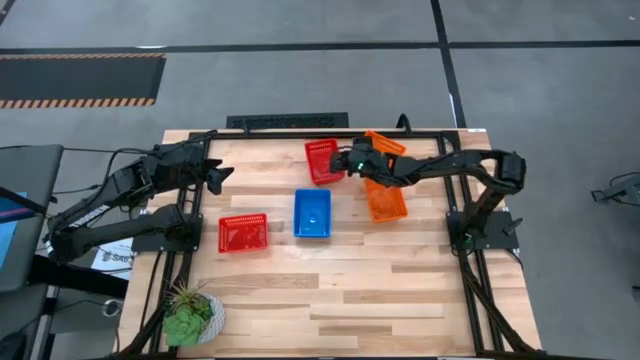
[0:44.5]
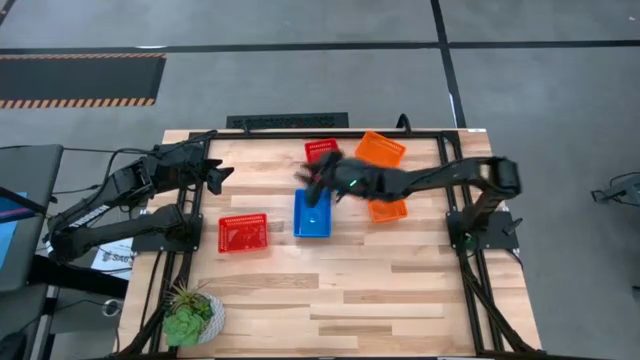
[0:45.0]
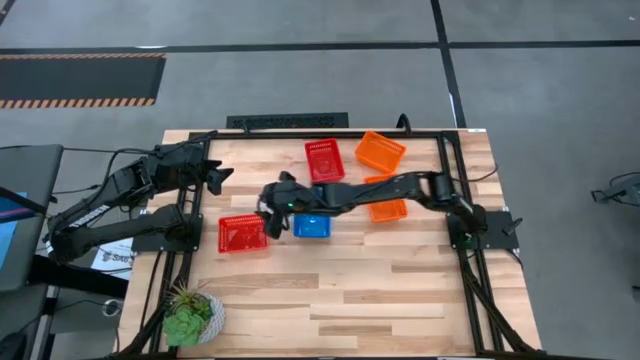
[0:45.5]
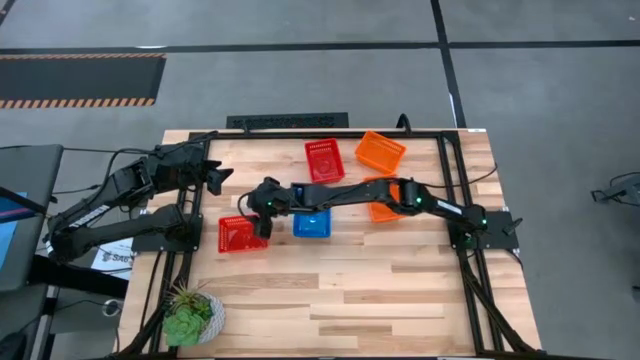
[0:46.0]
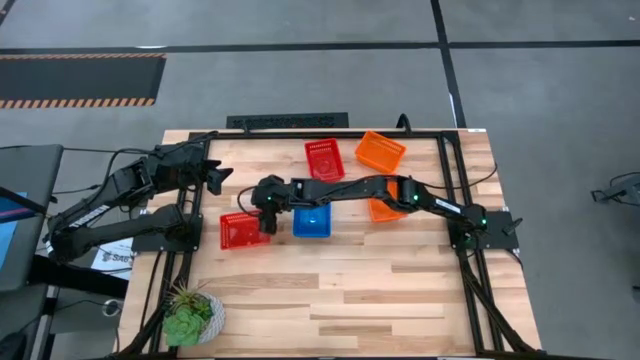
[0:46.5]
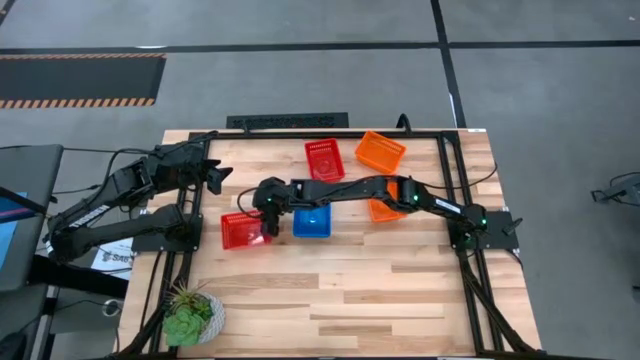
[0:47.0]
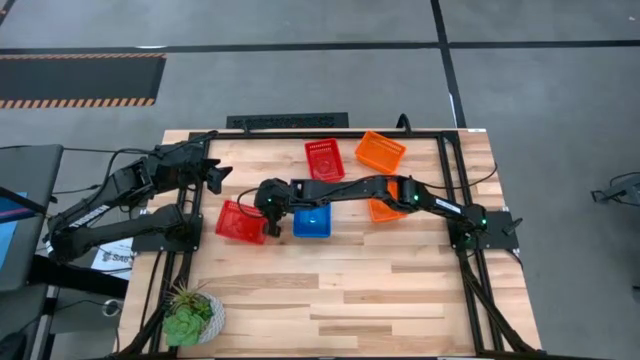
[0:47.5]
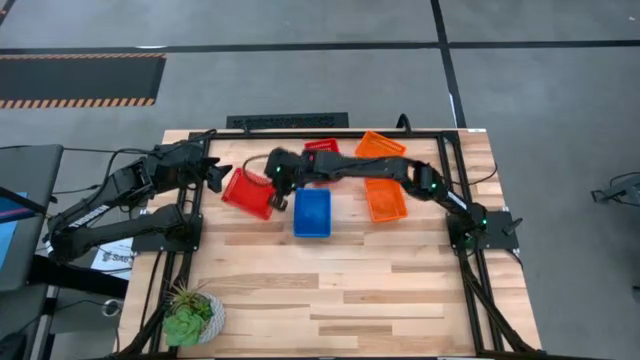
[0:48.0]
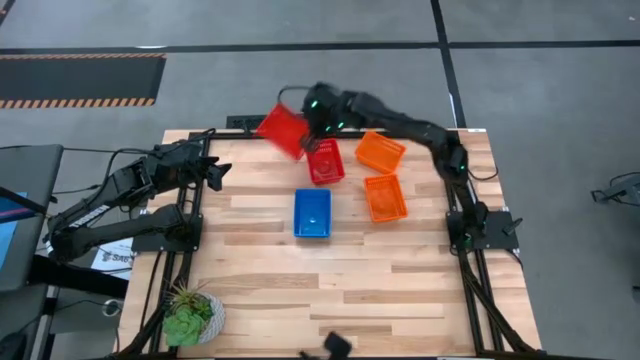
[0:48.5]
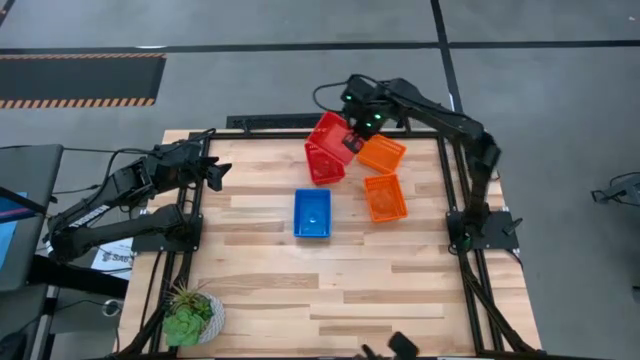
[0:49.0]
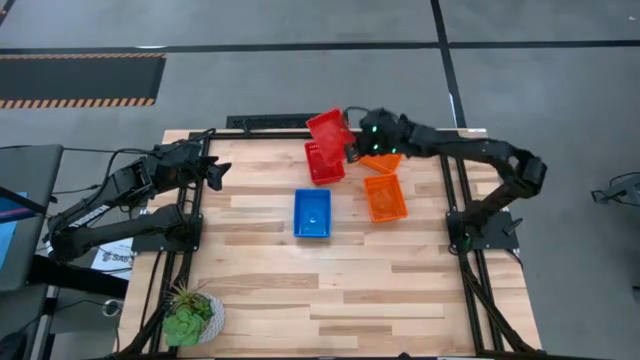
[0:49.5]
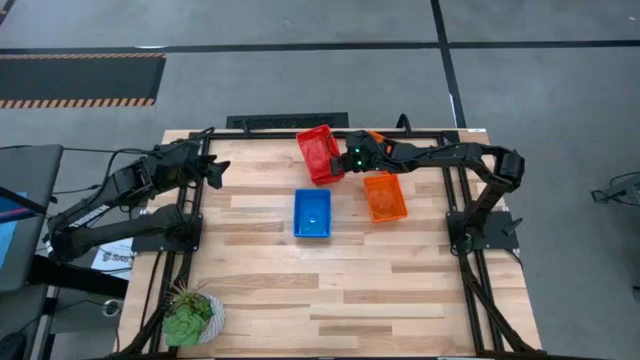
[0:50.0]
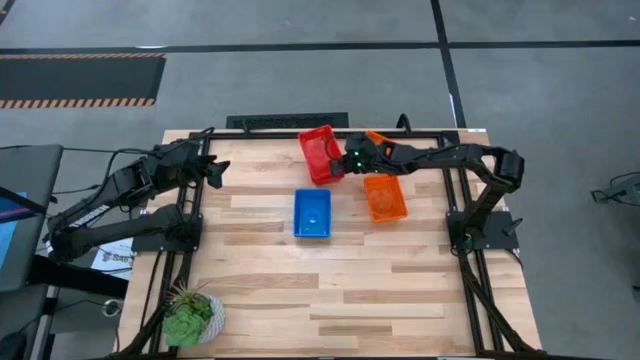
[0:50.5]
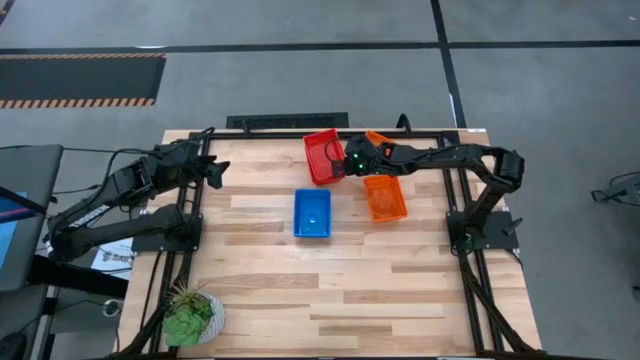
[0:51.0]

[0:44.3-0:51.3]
Stack the red bin into the stacked red bins

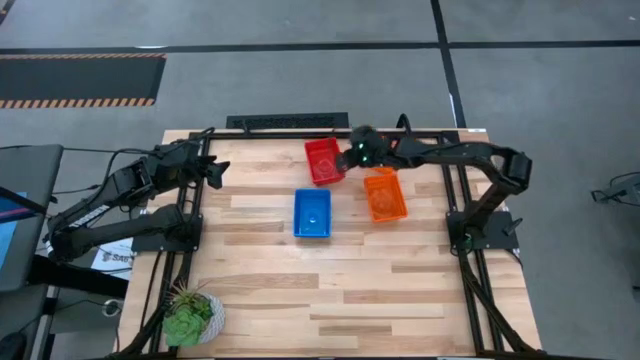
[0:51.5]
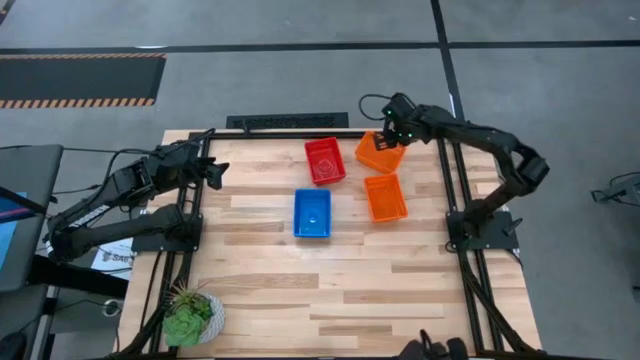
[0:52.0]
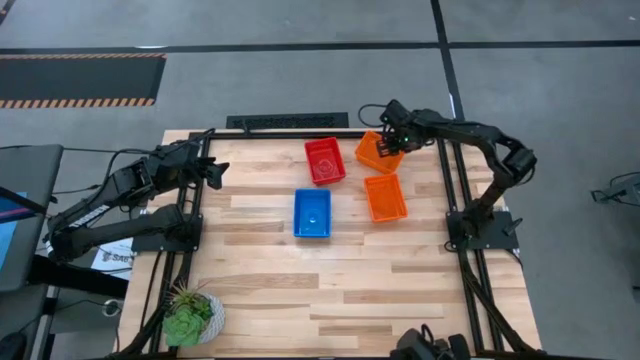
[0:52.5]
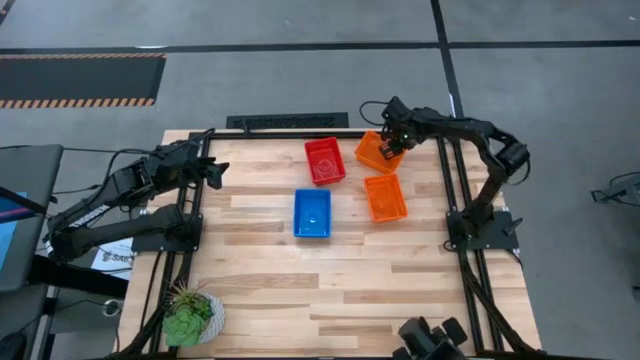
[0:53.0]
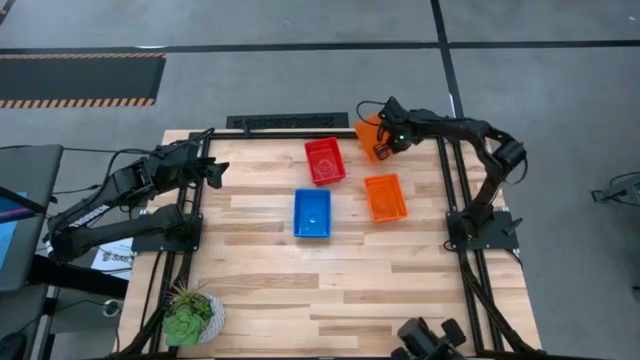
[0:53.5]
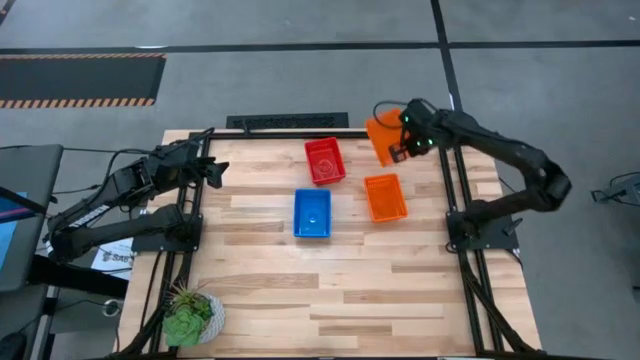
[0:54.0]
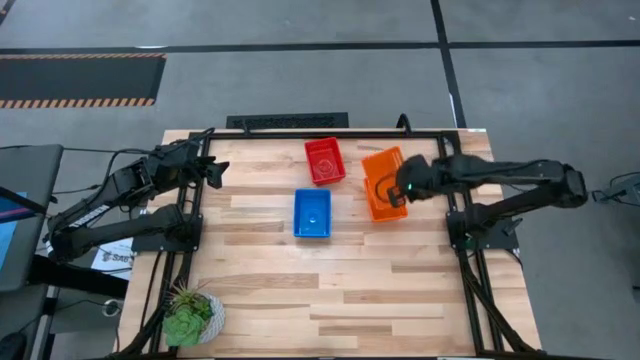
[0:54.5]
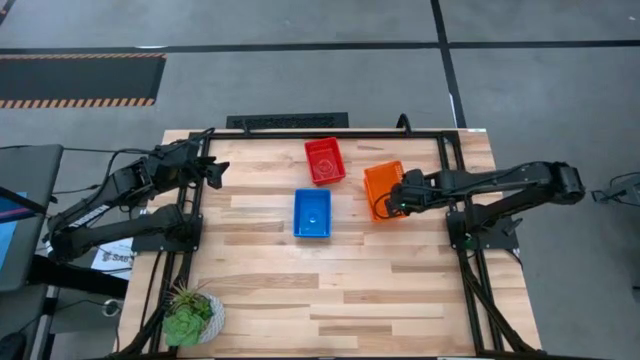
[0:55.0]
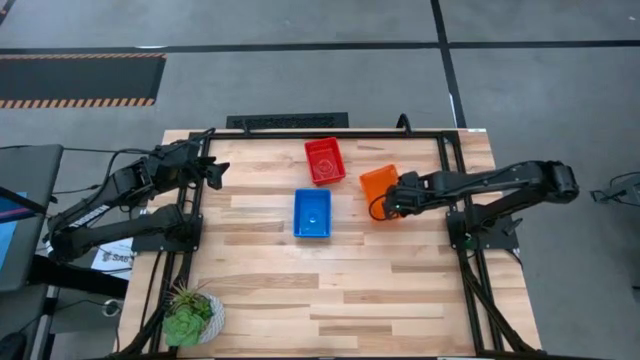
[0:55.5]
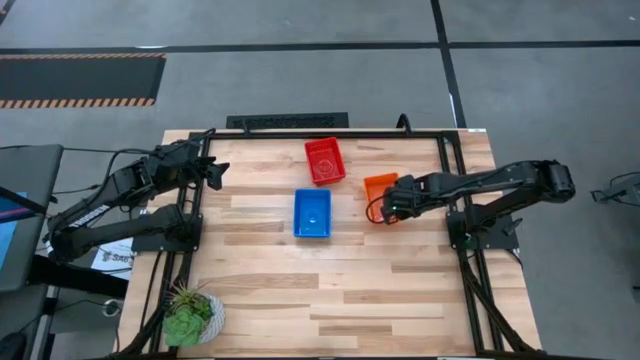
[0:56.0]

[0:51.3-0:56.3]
Stack the orange bin into the stacked orange bins

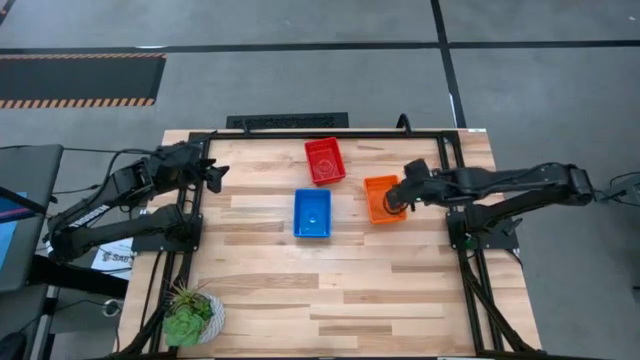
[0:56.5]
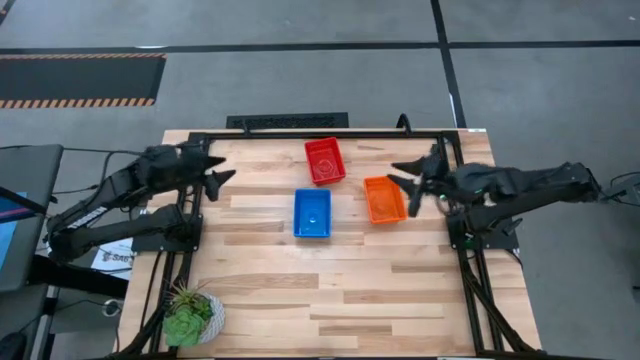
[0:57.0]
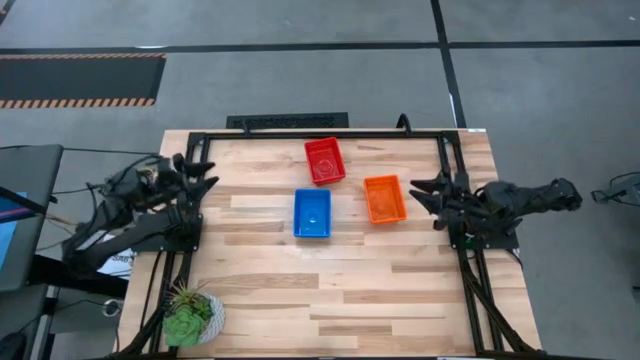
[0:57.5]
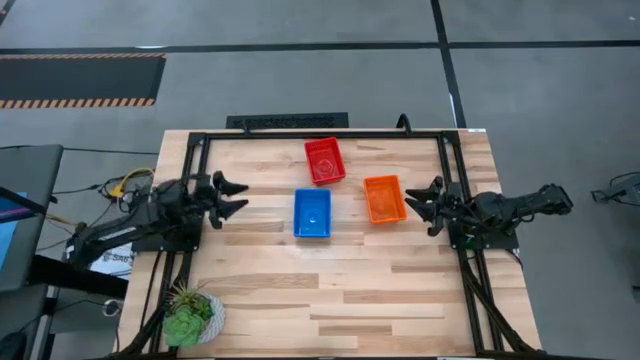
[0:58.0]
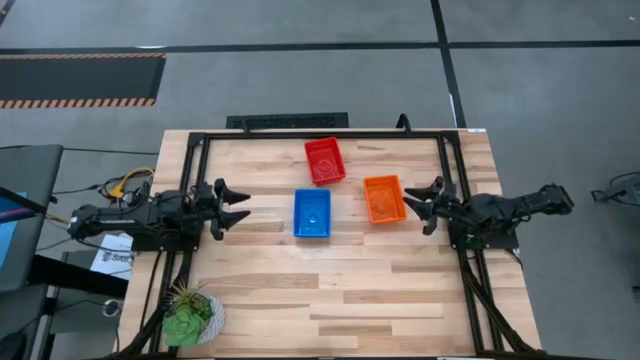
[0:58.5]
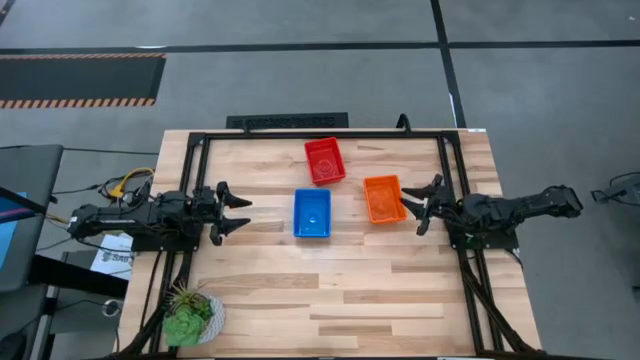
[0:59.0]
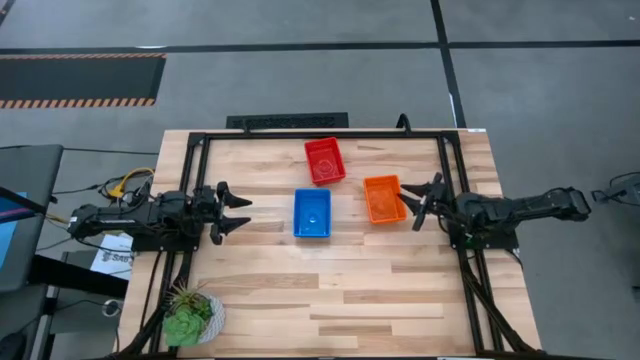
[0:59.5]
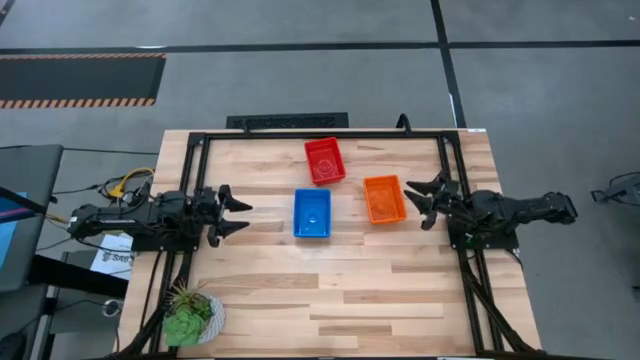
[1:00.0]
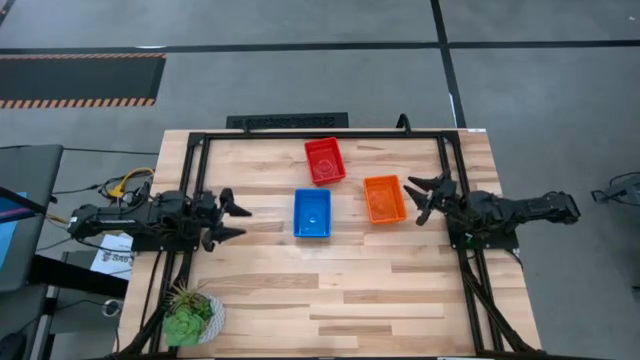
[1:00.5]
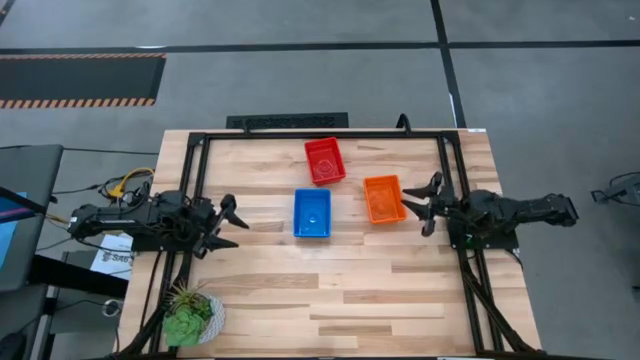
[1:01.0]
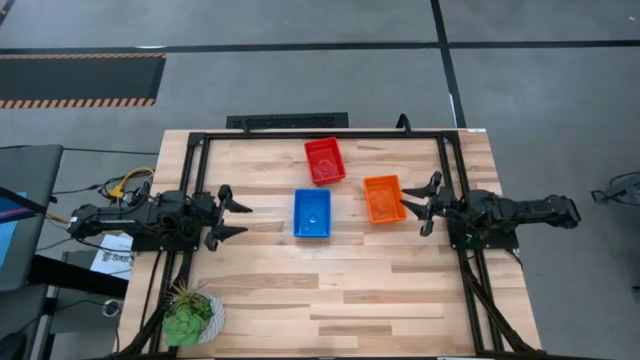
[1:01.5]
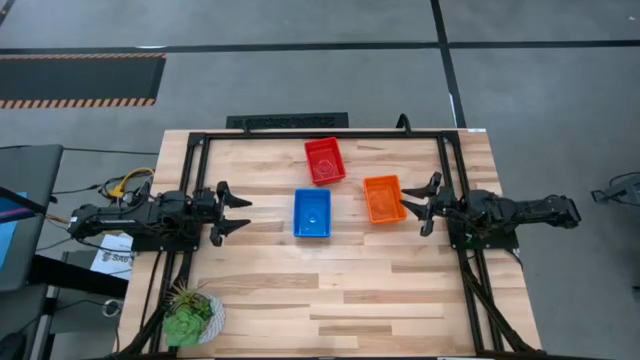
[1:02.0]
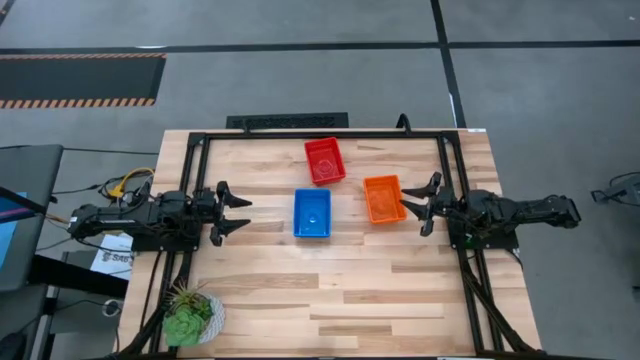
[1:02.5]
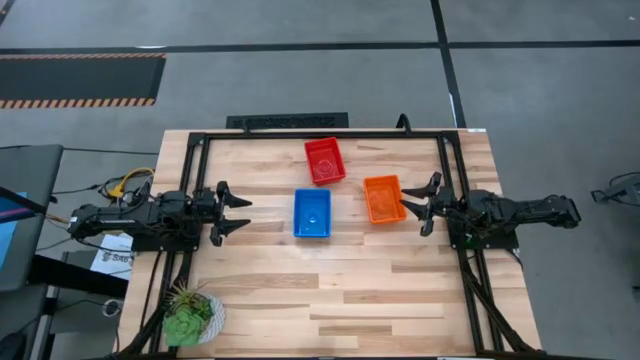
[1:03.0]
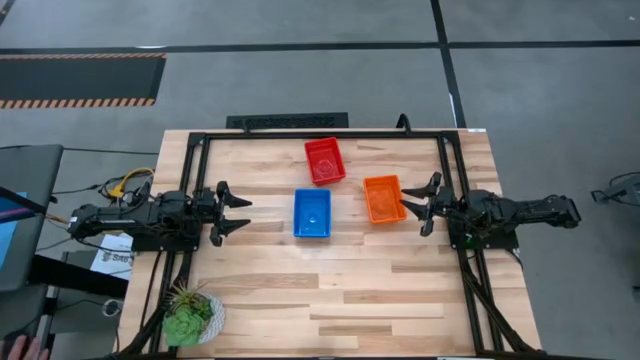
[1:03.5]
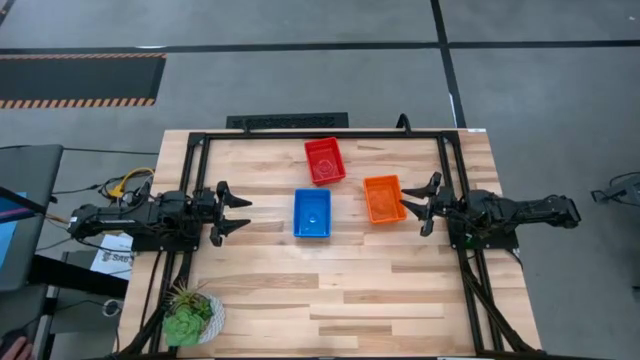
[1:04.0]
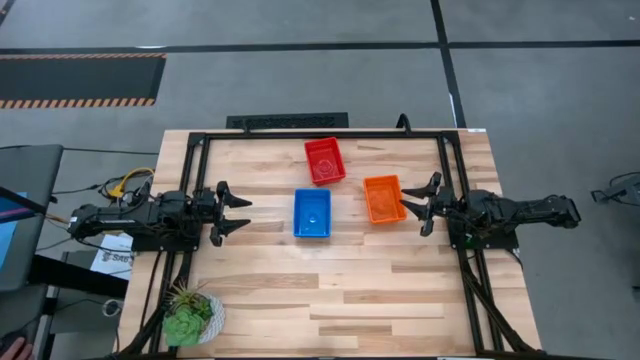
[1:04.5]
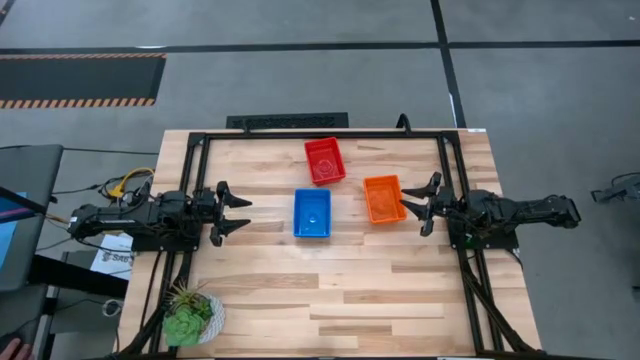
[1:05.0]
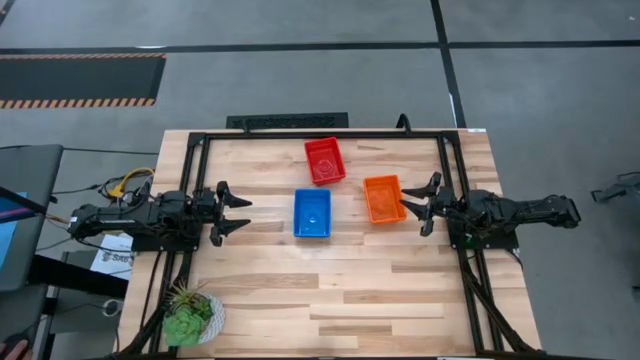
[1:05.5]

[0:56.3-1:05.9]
Return to Home Position
